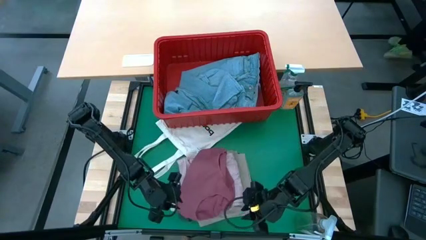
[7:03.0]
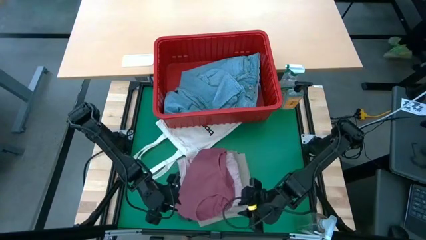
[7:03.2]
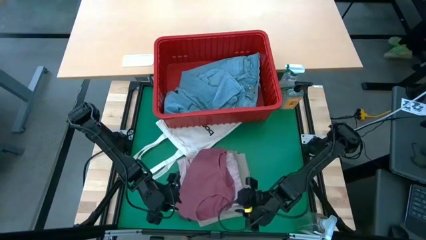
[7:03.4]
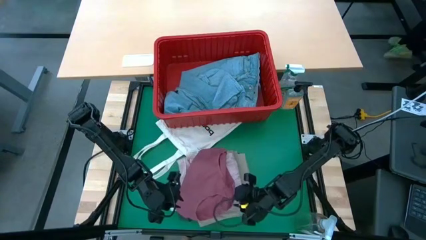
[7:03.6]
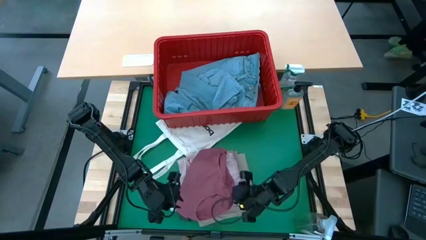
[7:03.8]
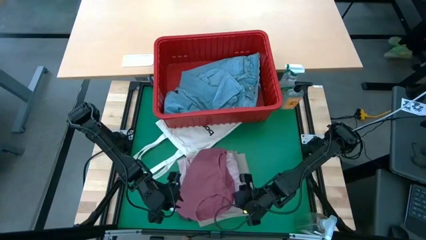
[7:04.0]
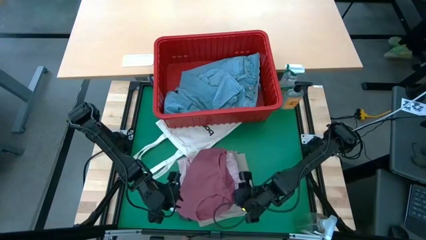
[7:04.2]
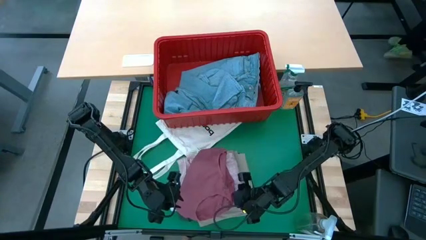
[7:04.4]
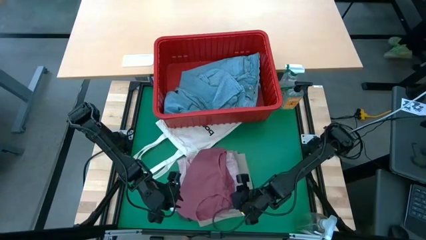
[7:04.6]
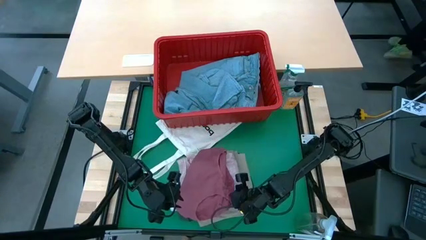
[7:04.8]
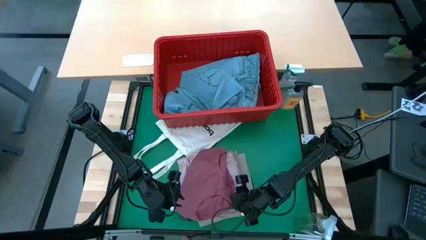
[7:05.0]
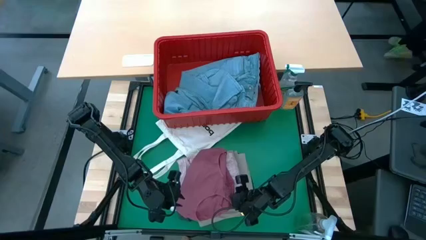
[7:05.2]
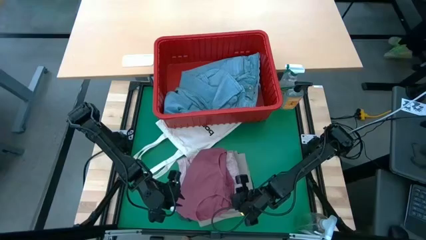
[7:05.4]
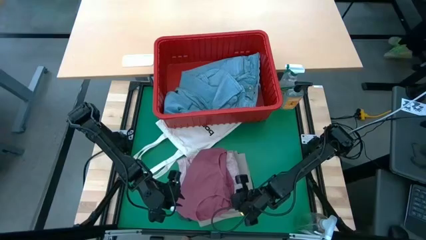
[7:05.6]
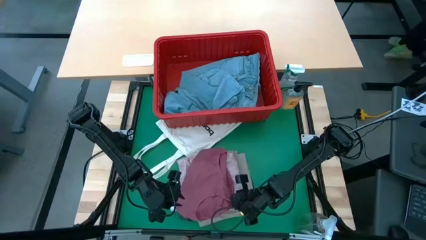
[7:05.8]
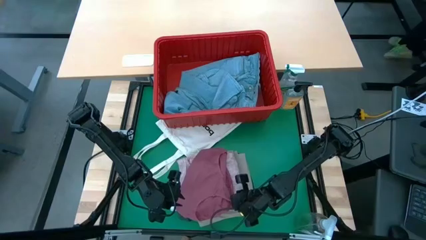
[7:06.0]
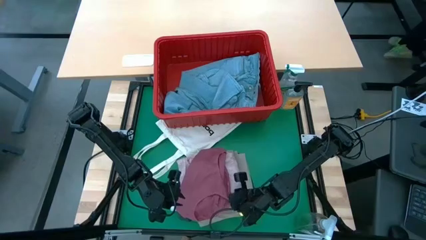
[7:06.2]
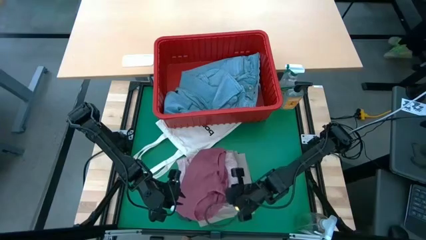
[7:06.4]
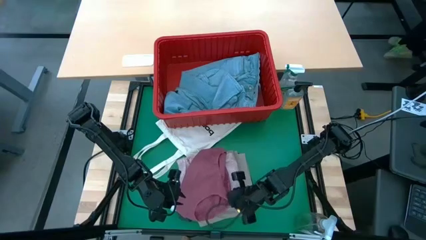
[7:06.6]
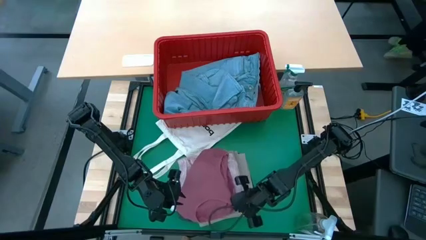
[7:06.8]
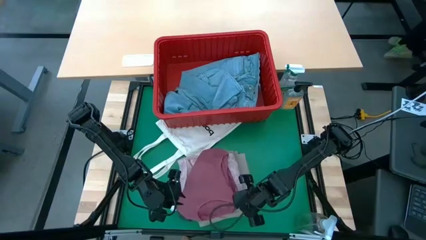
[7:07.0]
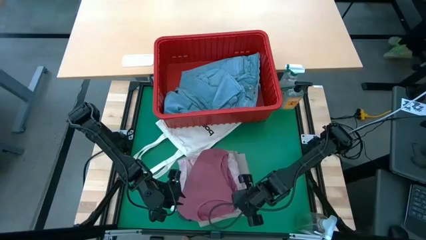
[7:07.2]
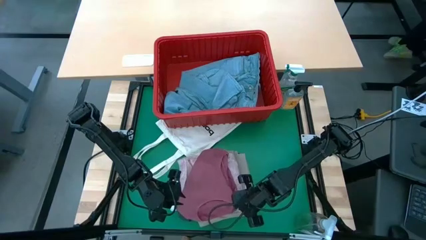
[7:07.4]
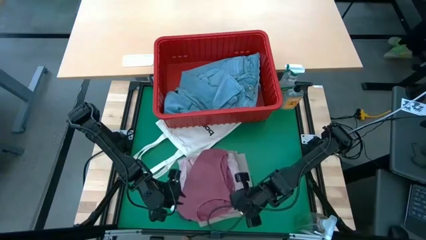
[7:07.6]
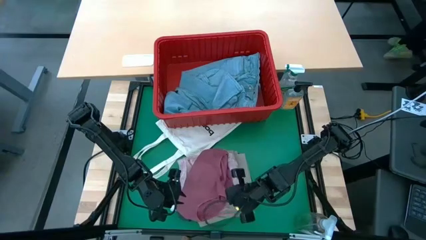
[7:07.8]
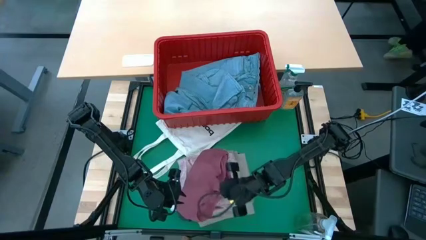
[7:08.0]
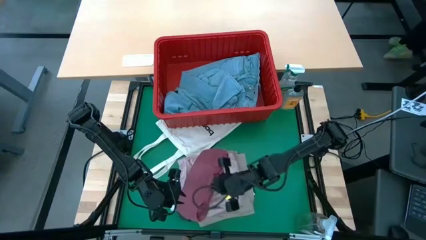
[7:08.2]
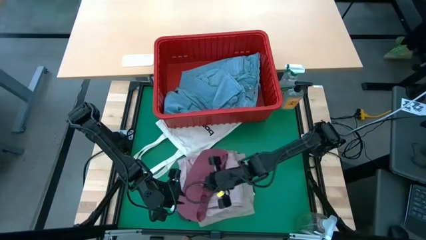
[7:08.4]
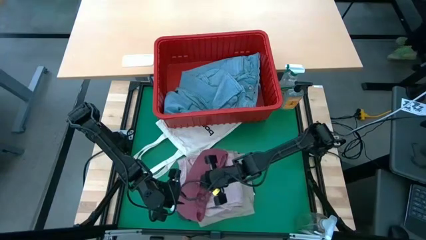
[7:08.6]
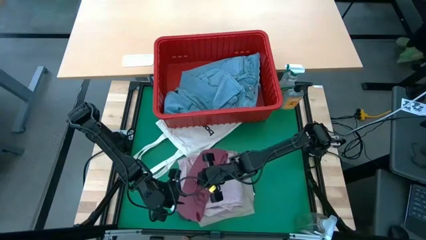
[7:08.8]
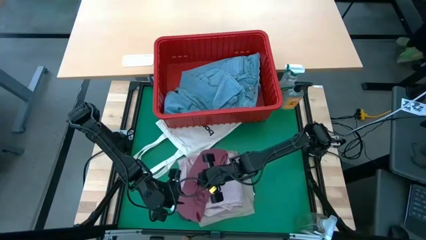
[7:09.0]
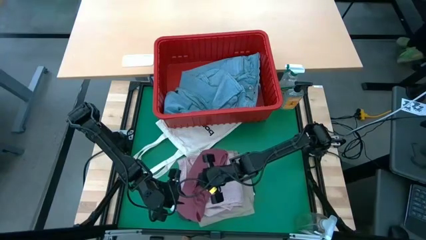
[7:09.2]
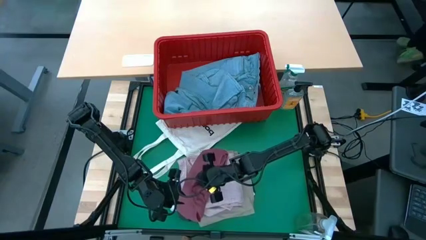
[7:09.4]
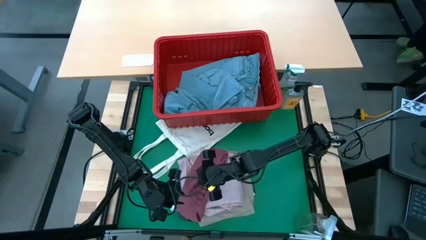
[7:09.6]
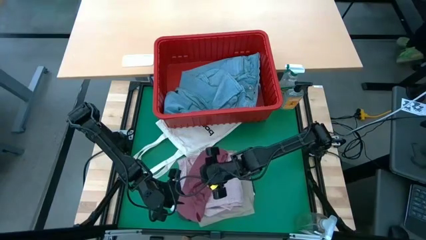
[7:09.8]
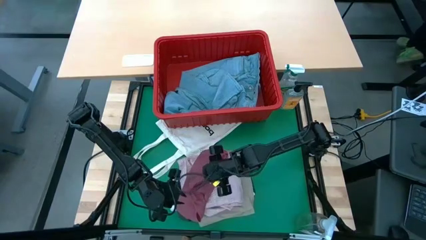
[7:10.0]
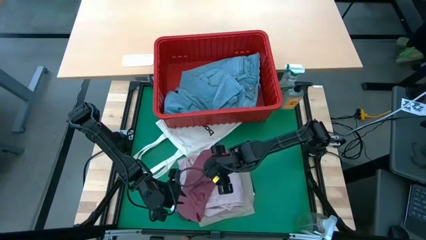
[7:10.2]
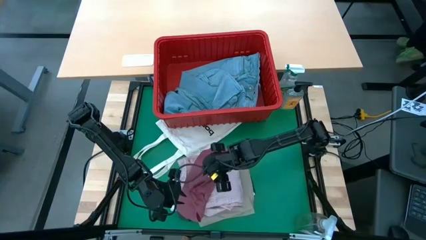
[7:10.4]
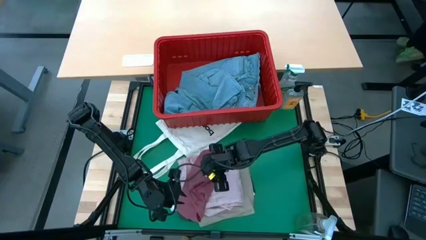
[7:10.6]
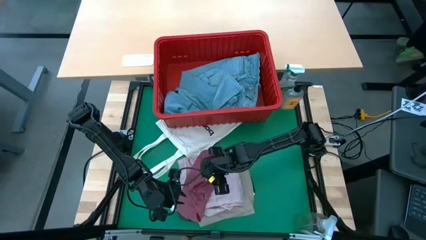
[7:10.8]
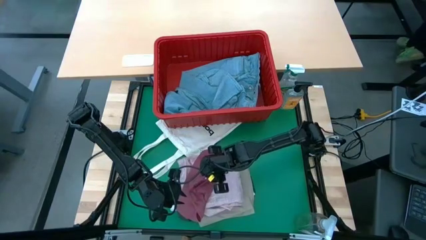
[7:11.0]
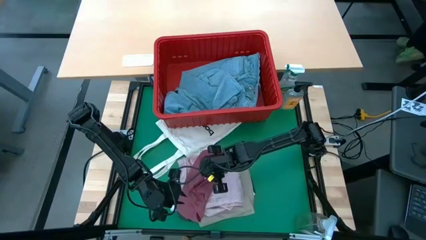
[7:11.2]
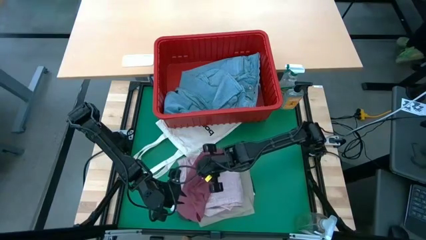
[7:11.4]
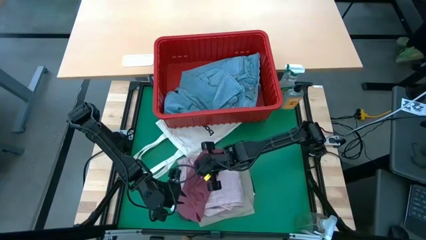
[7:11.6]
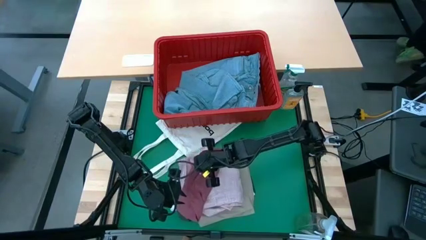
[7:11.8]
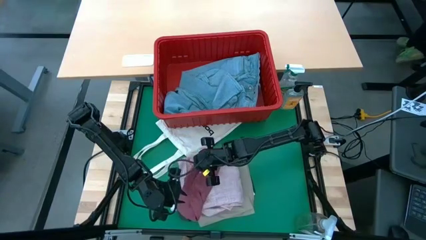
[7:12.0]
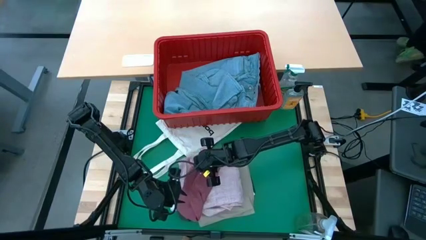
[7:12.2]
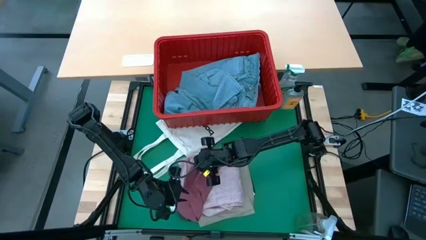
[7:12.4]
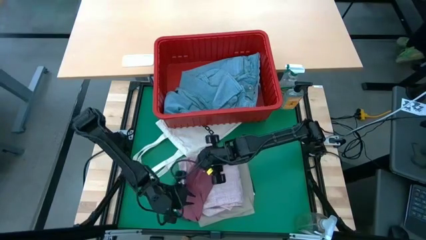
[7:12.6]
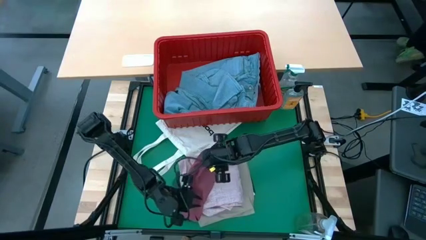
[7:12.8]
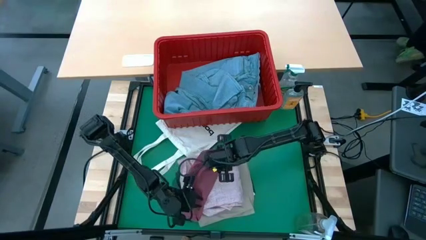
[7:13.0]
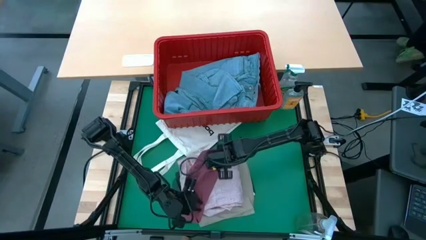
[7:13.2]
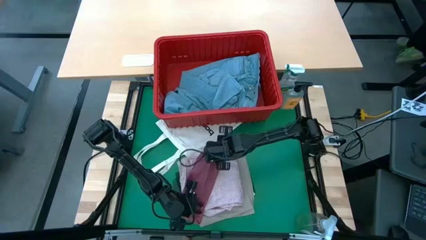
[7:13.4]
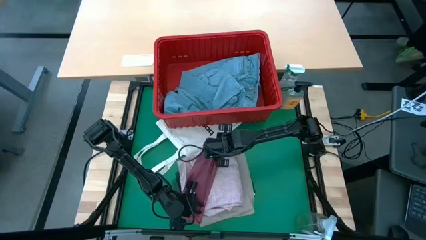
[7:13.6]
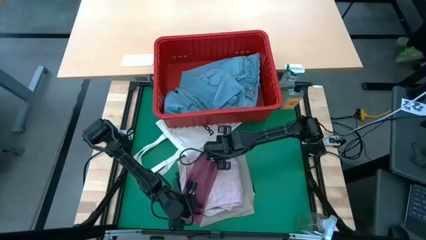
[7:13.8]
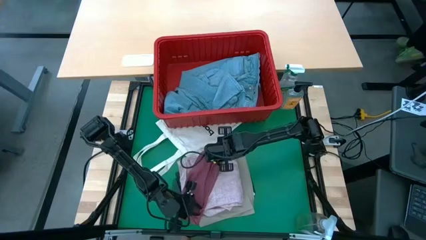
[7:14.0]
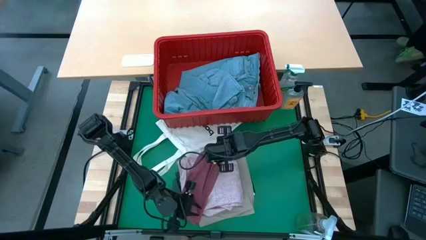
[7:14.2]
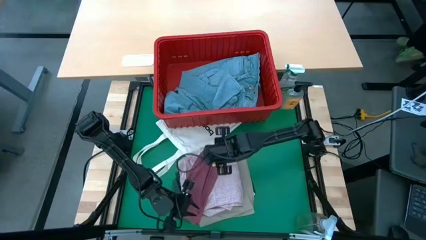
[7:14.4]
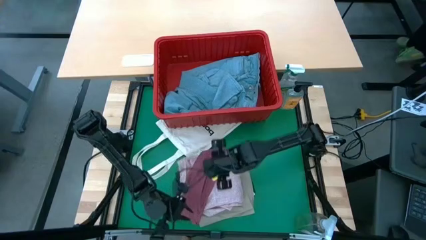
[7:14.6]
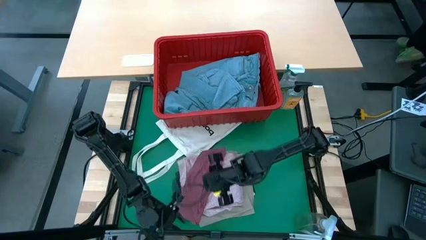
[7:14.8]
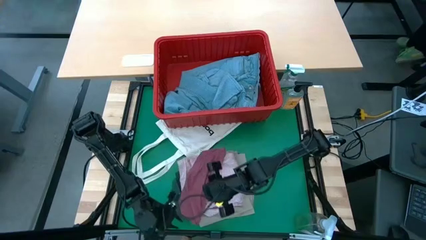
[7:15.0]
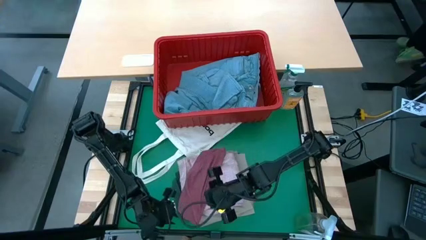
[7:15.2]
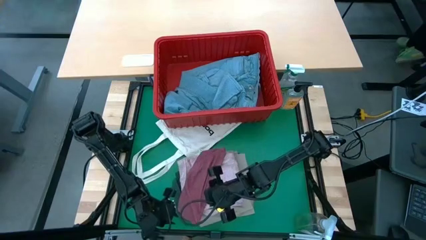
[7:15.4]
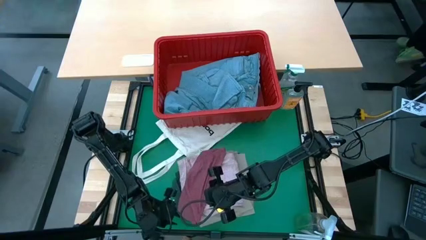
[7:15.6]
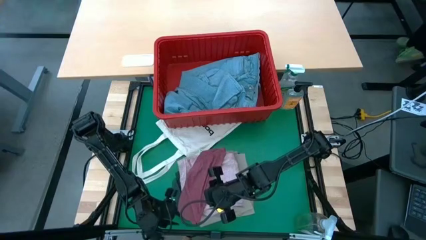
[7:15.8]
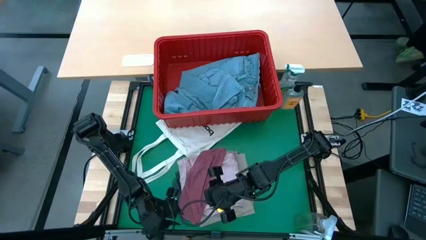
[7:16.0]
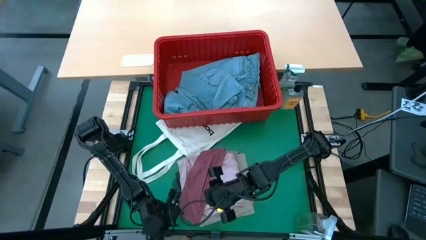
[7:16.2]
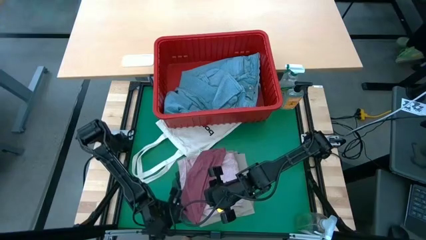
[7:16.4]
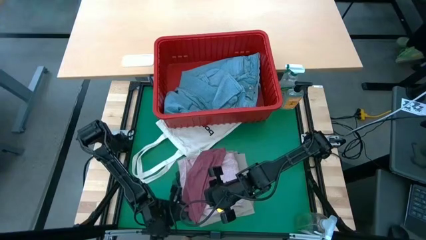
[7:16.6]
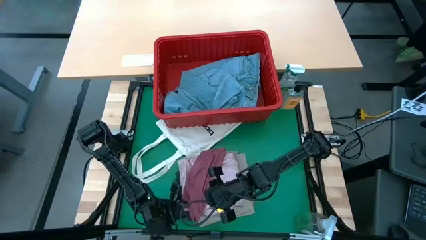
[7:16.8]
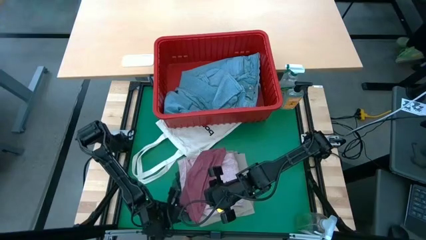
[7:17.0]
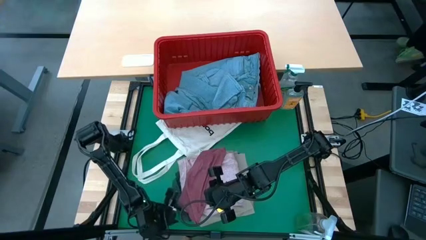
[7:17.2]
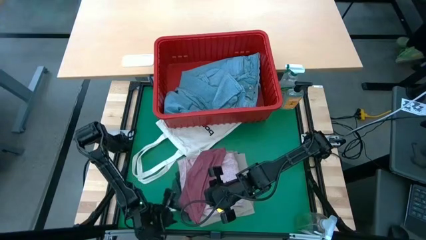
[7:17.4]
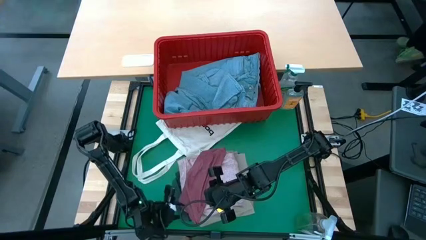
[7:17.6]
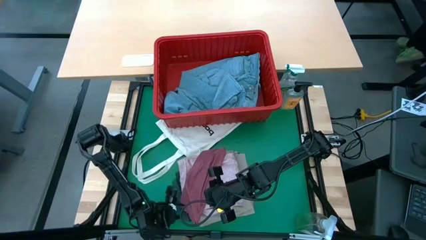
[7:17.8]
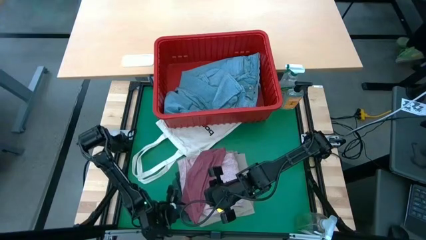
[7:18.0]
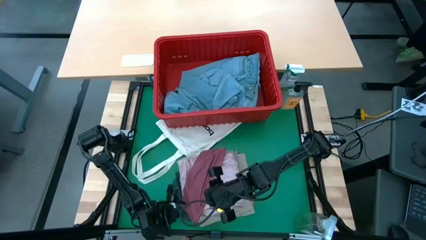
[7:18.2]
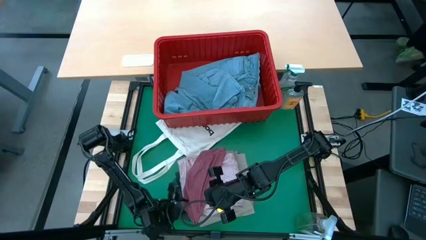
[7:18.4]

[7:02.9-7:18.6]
Task: Fold laundry
Fold the purple panty
